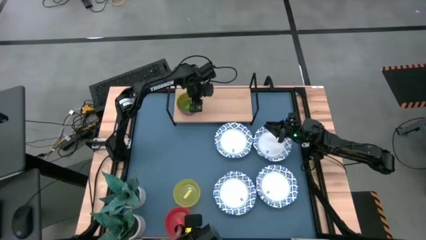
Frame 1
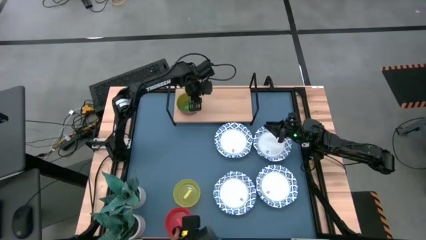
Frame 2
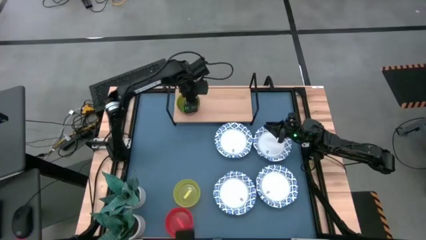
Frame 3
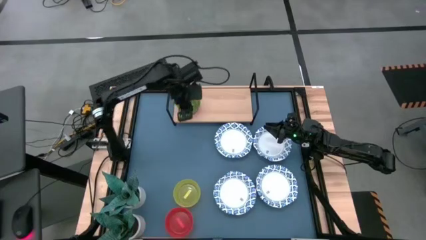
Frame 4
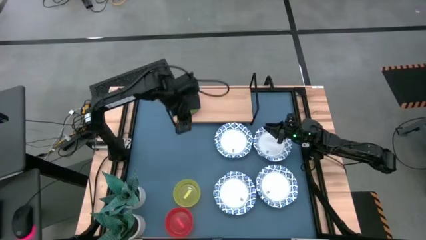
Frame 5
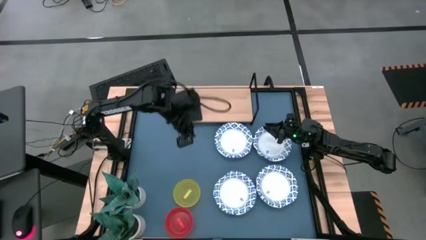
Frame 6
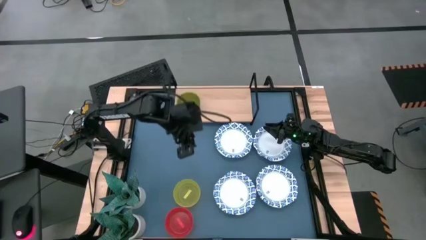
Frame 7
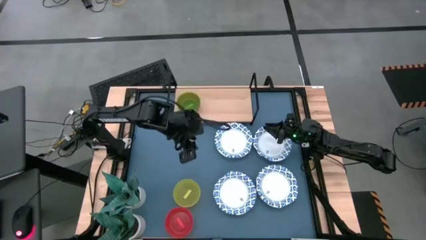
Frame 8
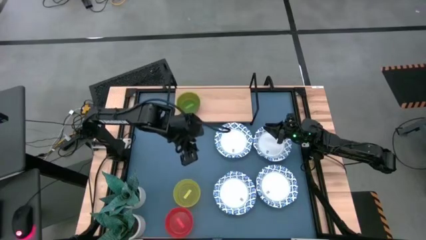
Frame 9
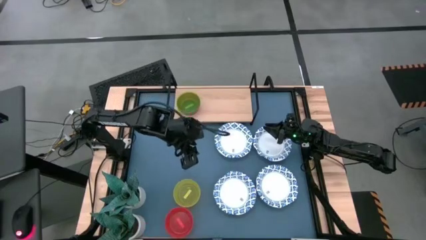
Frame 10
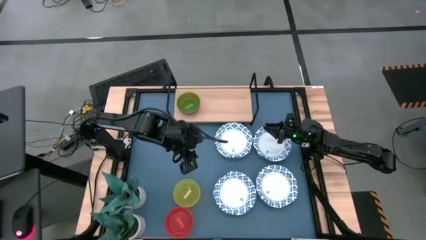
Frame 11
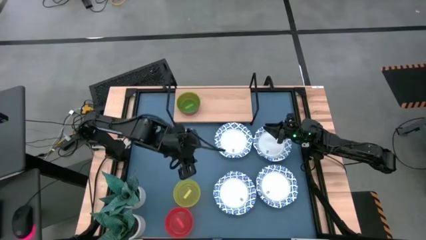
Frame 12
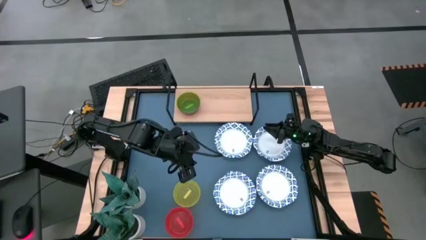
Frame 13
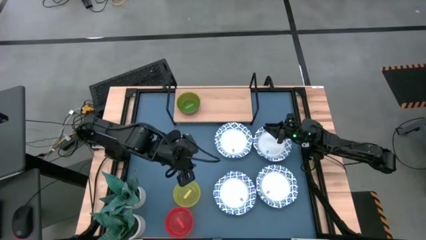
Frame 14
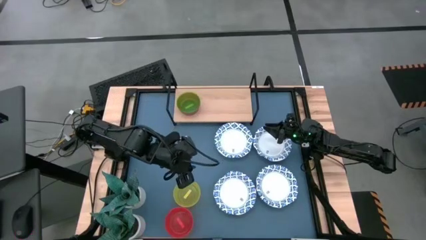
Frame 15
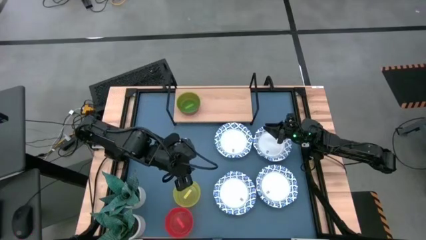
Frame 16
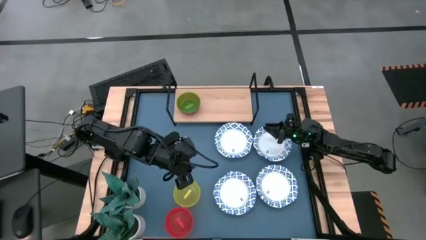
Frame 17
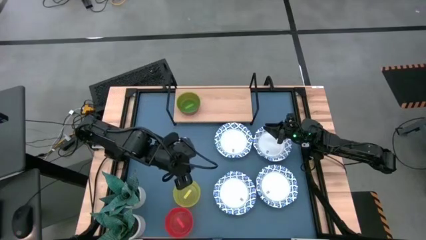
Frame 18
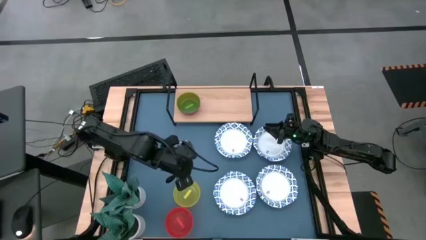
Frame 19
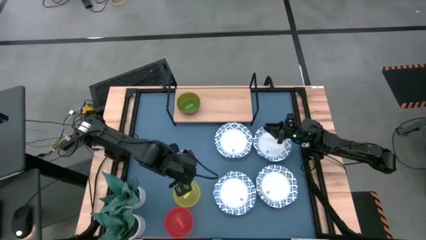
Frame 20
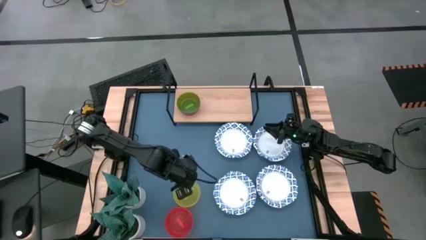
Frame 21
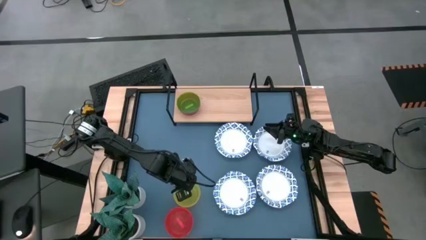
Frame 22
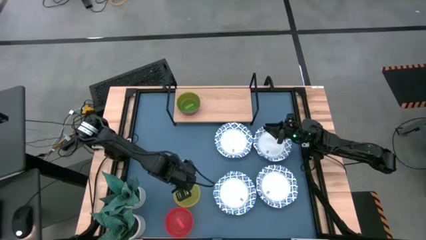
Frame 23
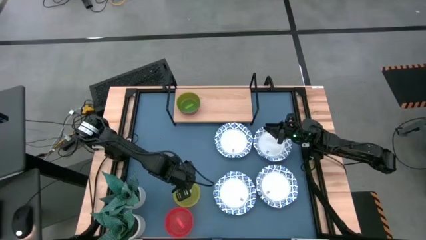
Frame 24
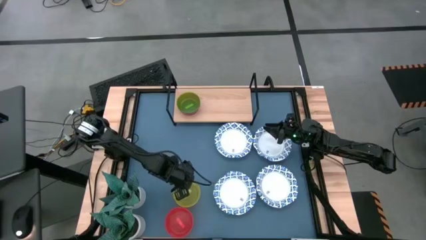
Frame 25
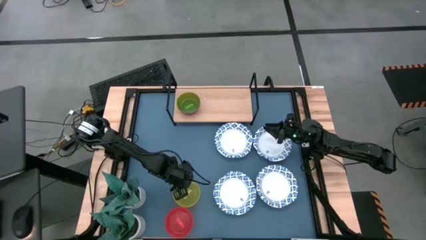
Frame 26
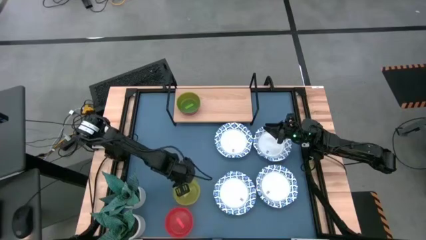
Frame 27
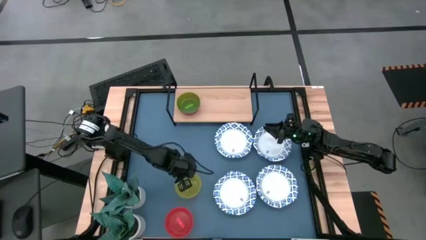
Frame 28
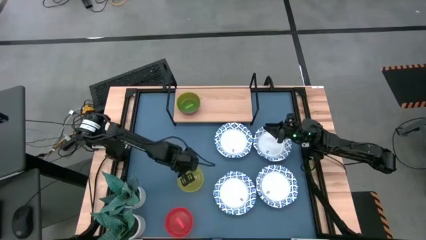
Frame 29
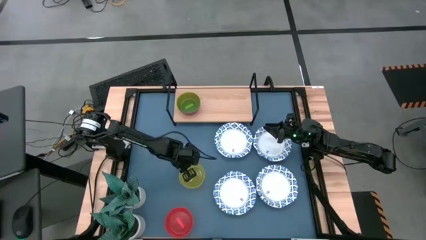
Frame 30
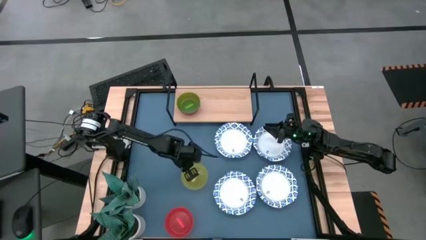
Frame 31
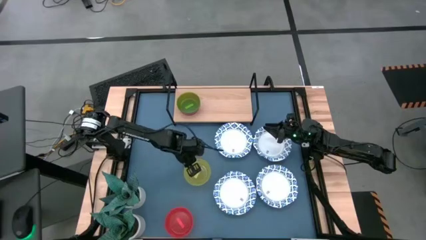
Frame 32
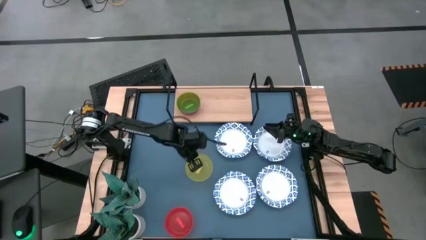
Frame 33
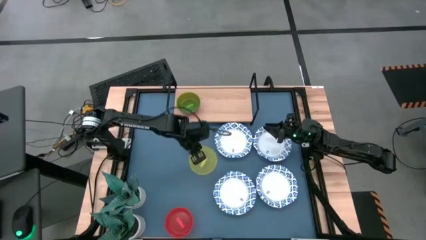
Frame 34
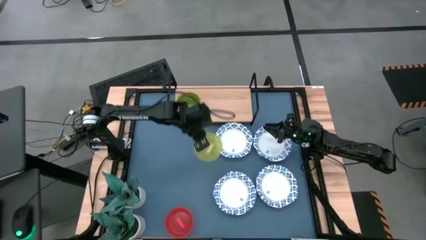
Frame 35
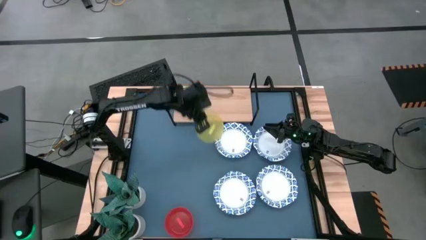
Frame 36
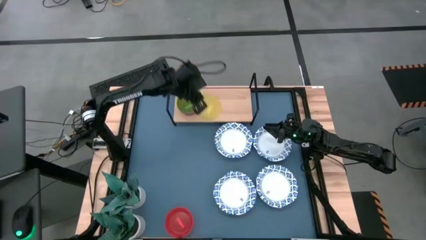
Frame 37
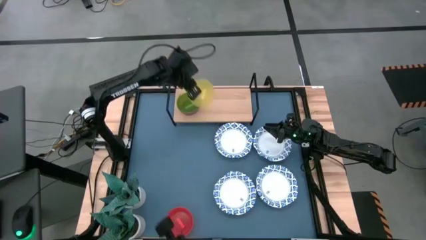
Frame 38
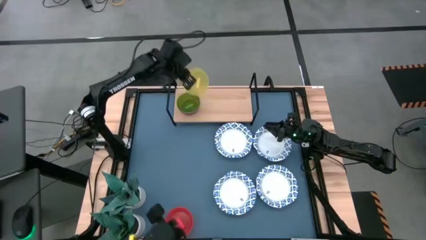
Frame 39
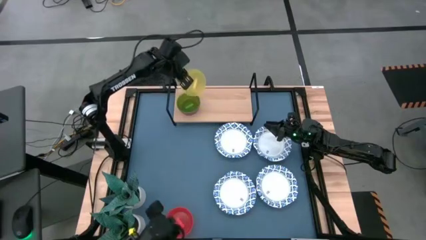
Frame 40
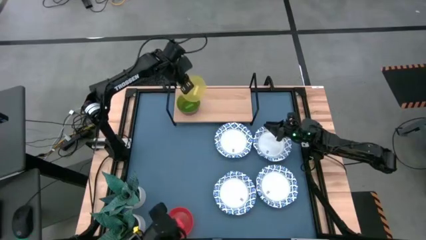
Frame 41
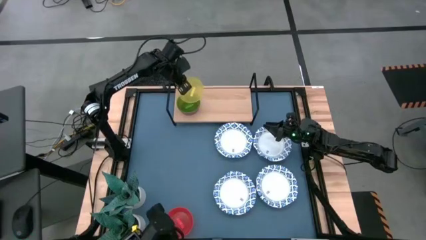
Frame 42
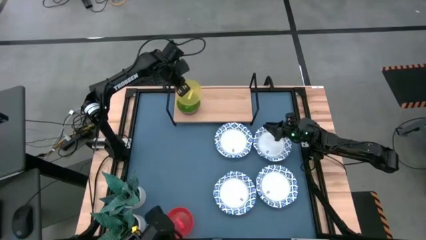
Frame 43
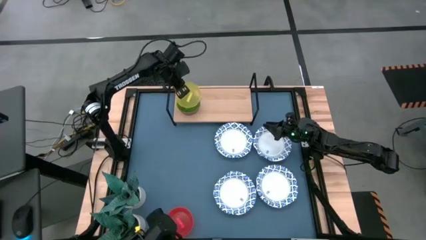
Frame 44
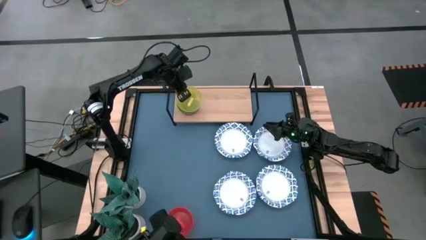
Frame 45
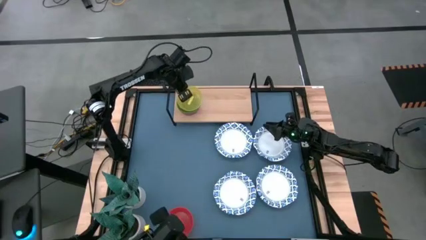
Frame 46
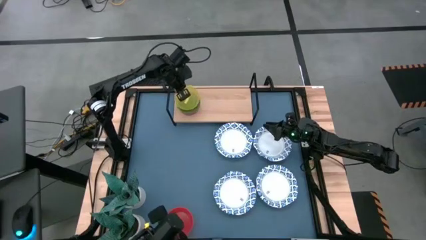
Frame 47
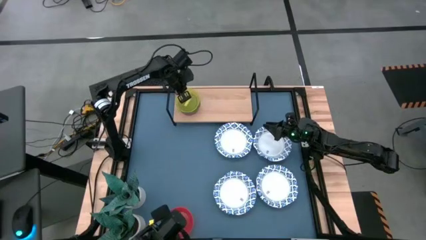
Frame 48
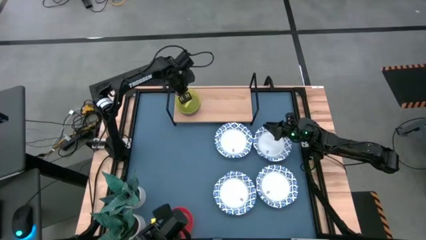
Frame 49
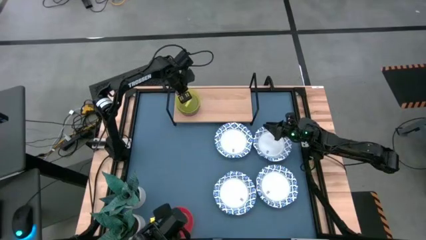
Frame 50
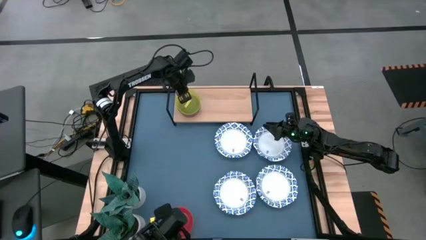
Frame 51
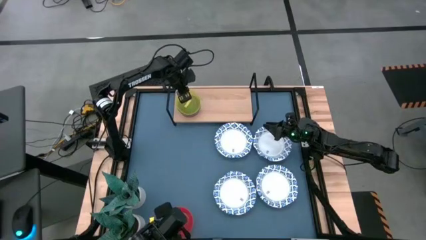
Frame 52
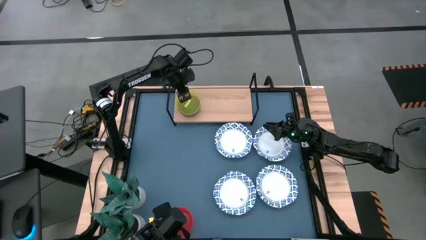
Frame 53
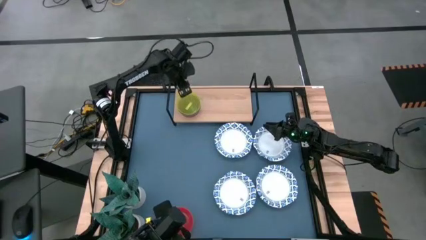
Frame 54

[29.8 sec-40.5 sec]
Task: Place and stack bowls onto a shelf
Stack the yellow transparent bowl into the green transparent bowl on the shelf

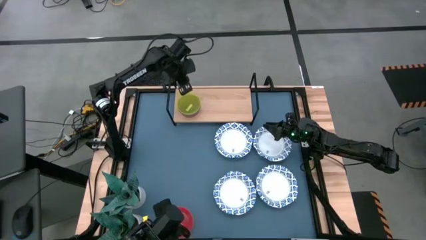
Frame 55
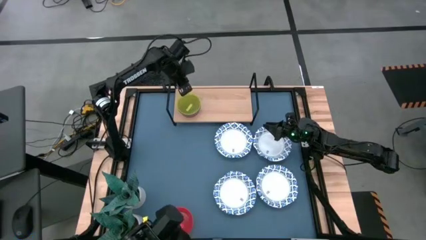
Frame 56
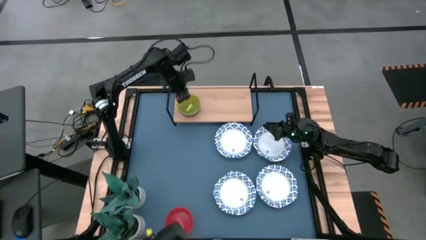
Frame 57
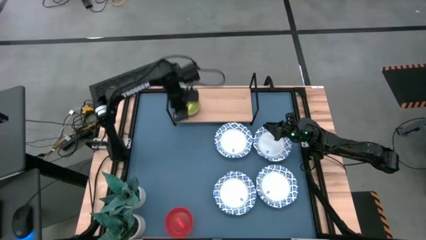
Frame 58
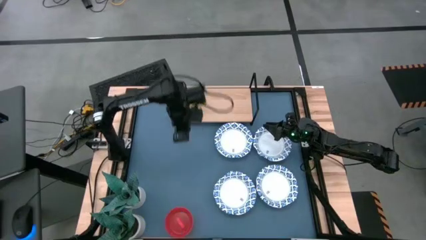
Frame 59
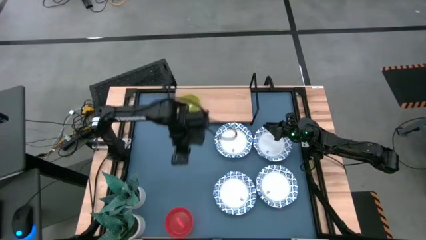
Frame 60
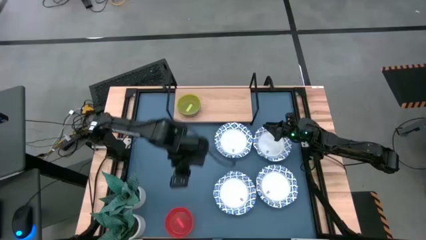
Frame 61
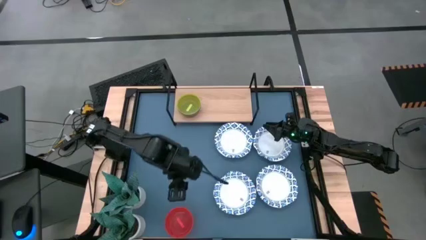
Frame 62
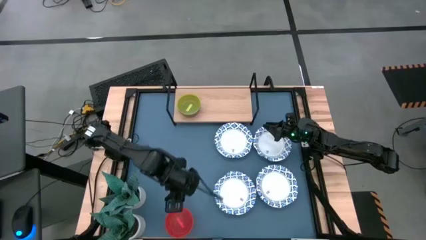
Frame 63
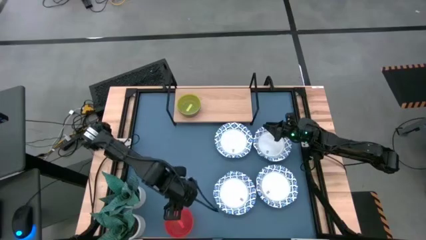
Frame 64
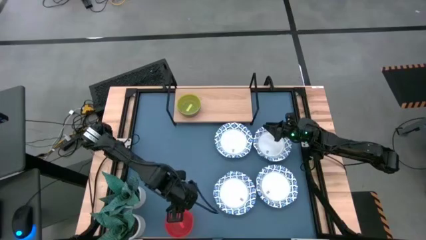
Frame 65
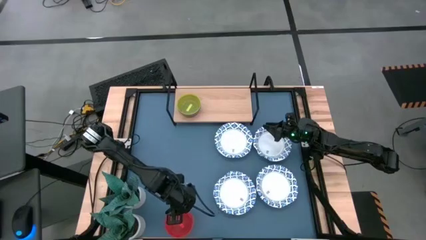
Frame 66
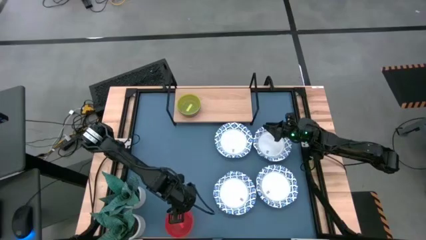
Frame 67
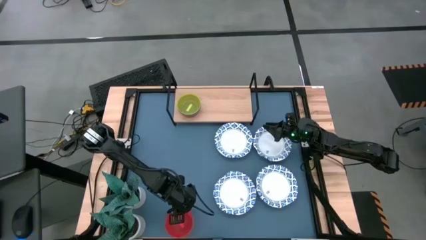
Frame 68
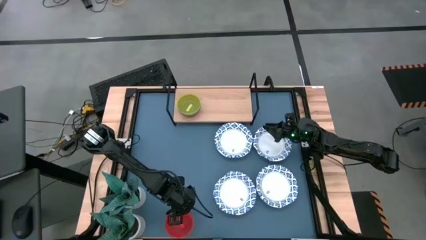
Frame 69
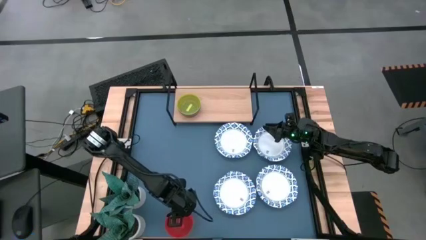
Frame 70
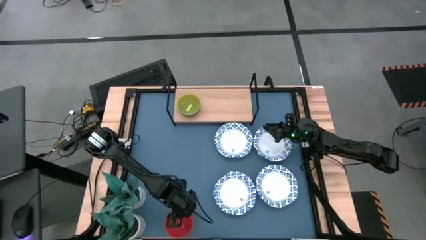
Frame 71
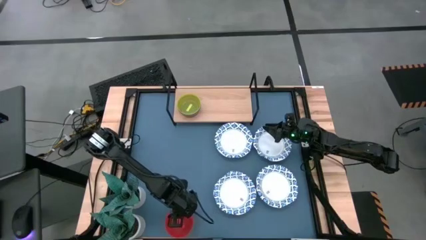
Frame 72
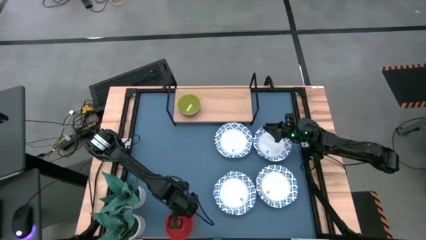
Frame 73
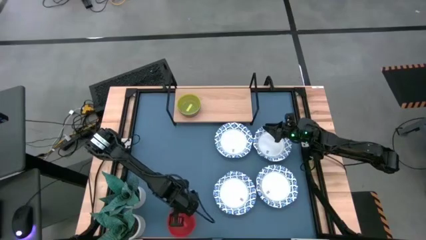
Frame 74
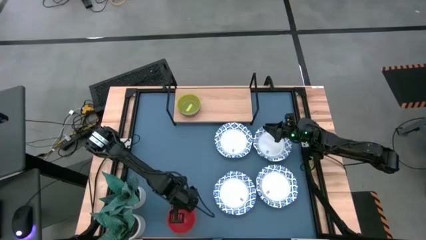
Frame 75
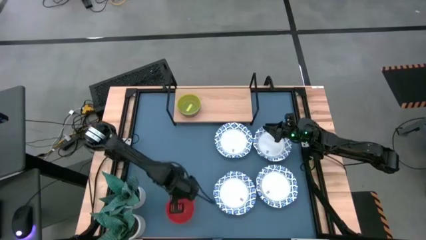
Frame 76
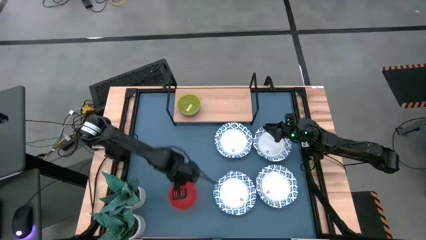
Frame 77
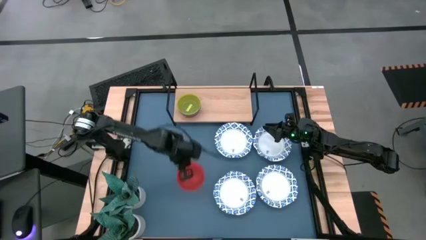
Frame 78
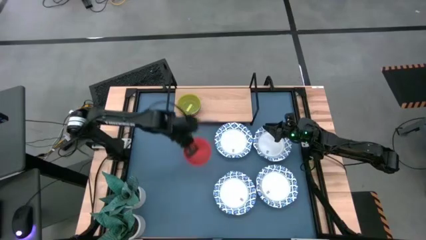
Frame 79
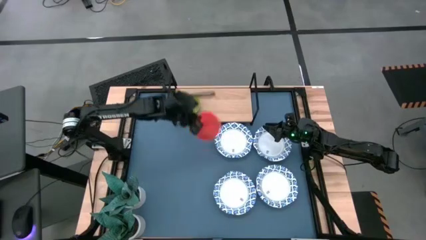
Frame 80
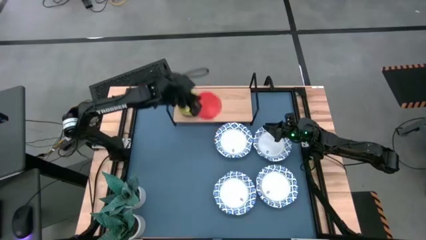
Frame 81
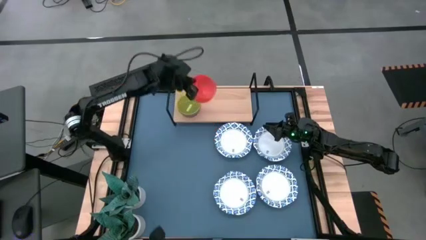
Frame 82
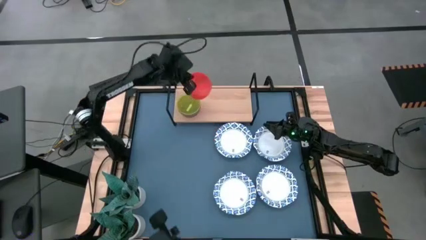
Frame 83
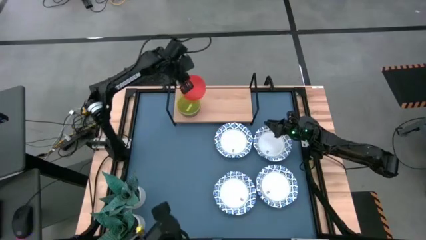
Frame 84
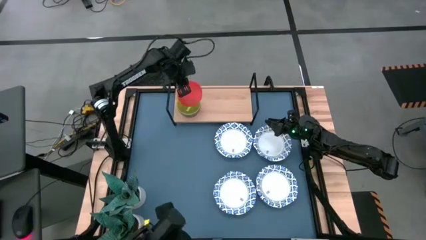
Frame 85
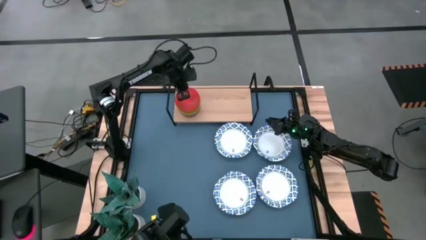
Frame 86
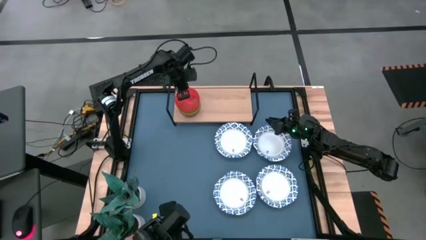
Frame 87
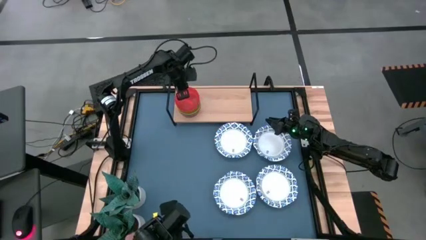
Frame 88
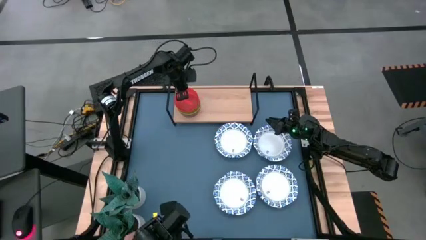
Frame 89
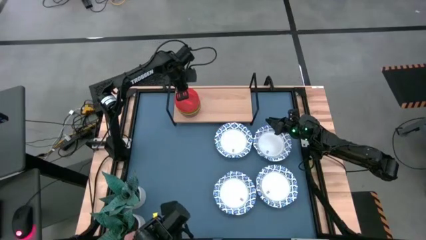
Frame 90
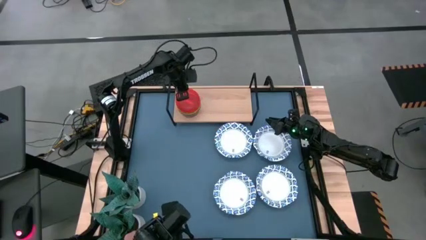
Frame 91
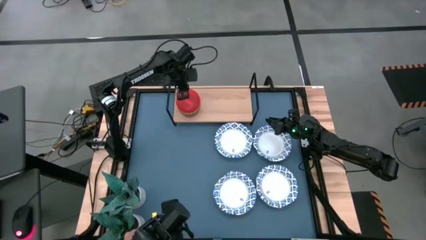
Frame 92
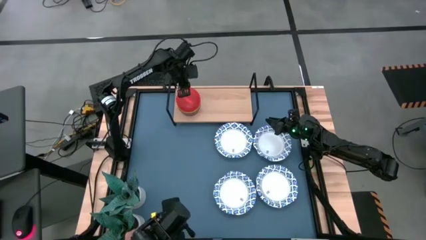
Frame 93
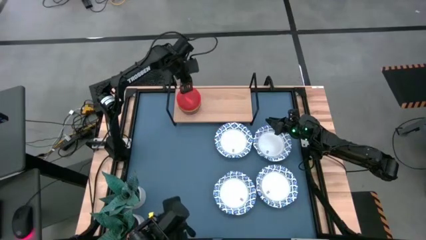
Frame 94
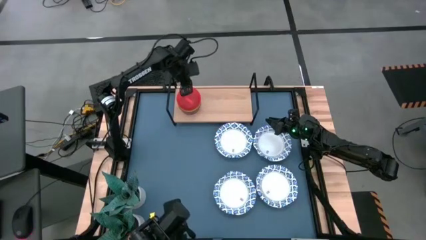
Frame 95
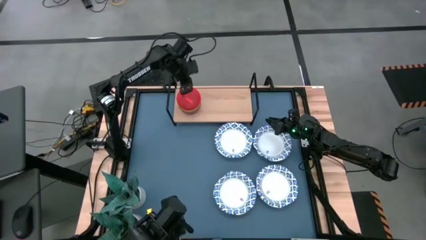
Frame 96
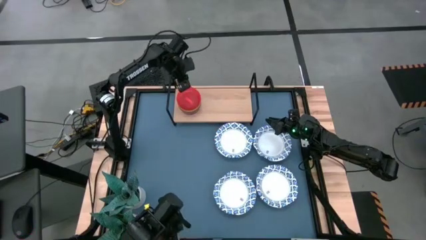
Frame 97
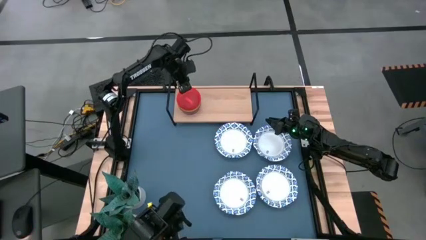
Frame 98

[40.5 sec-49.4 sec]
Stack the orange transparent bowl into the yellow transparent bowl on the shelf
